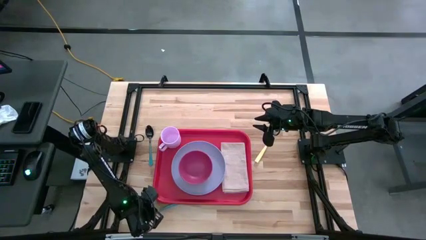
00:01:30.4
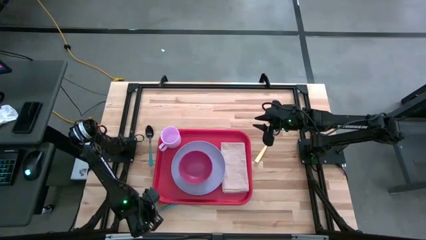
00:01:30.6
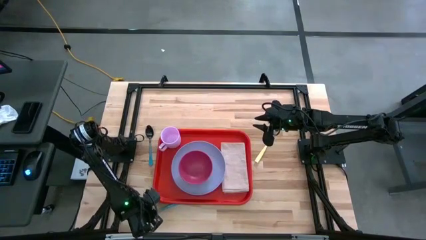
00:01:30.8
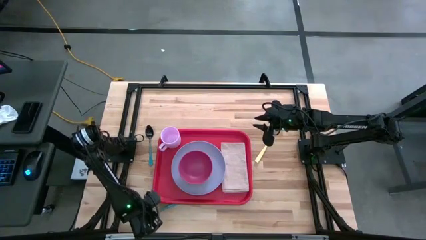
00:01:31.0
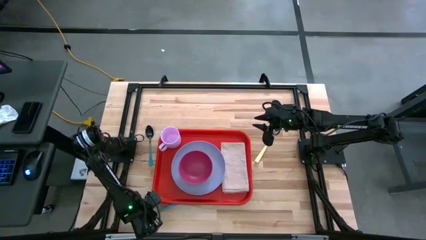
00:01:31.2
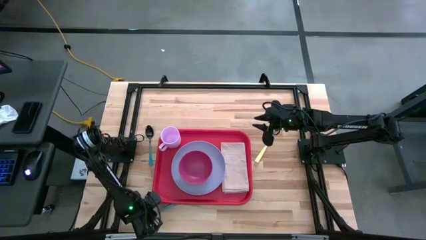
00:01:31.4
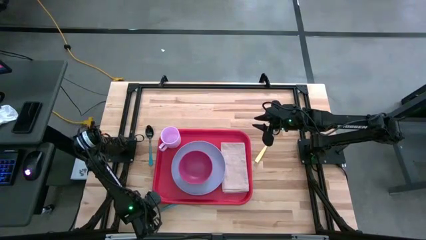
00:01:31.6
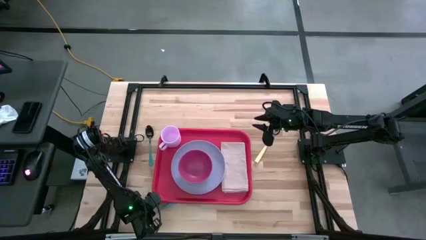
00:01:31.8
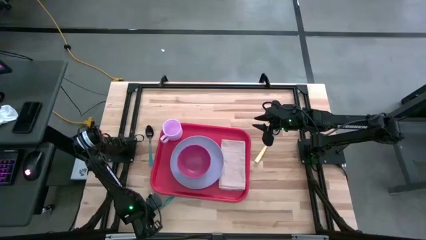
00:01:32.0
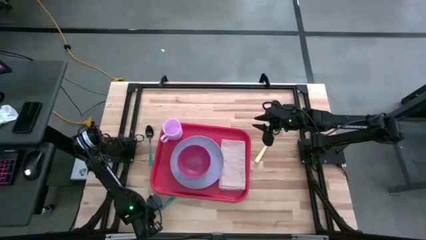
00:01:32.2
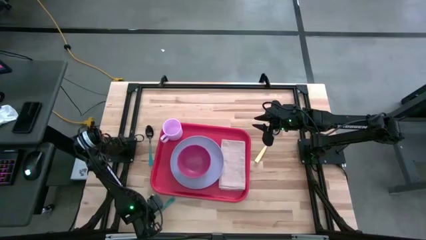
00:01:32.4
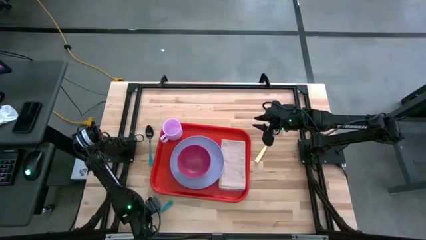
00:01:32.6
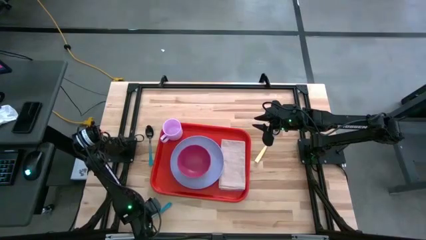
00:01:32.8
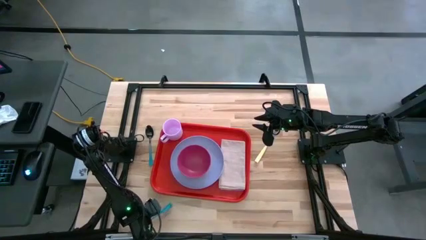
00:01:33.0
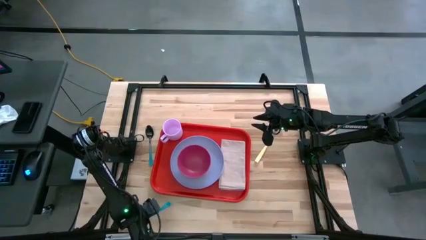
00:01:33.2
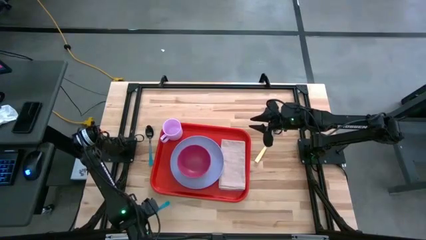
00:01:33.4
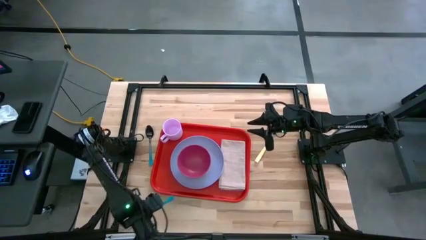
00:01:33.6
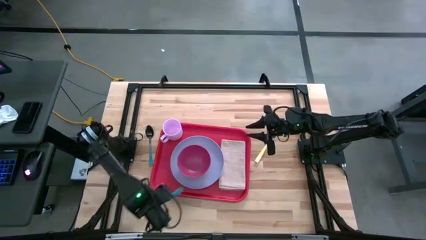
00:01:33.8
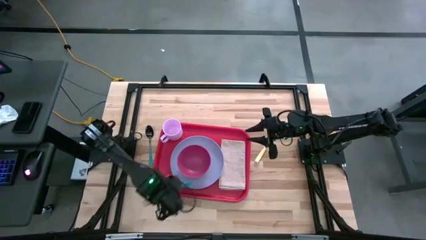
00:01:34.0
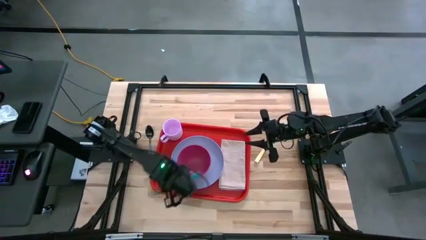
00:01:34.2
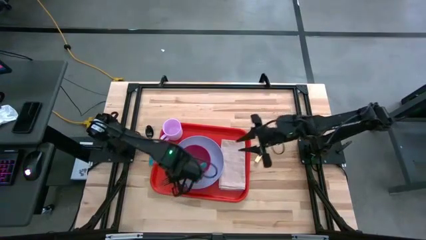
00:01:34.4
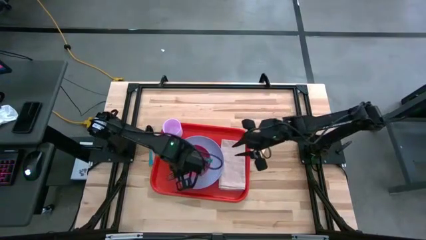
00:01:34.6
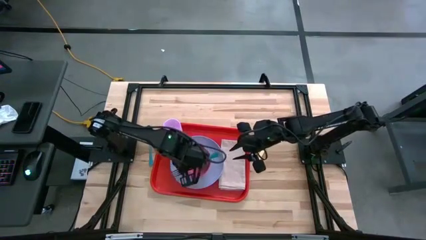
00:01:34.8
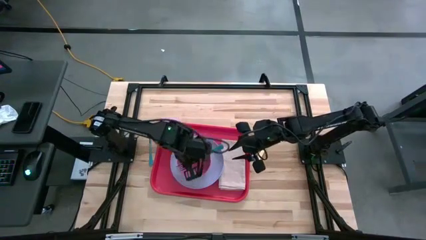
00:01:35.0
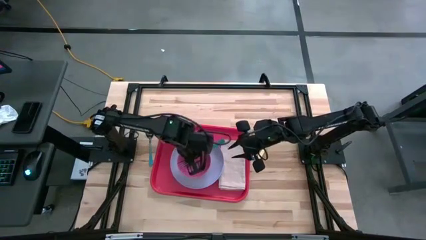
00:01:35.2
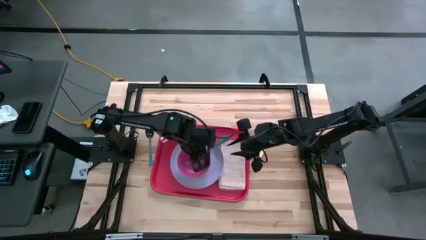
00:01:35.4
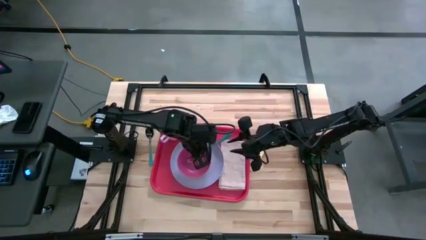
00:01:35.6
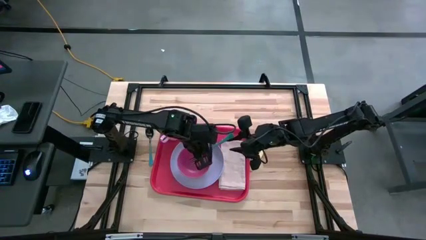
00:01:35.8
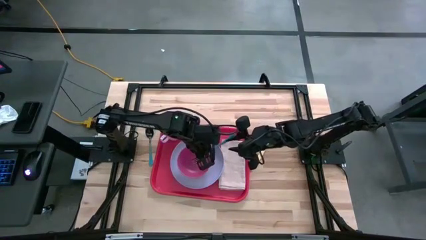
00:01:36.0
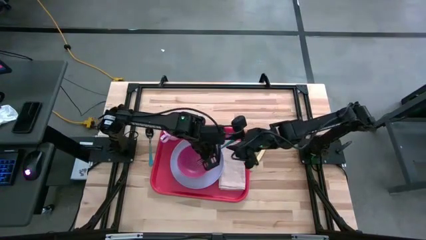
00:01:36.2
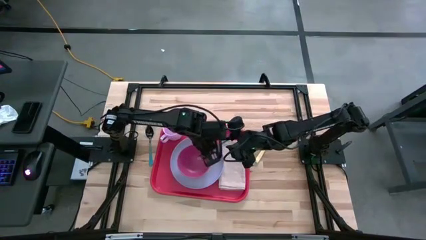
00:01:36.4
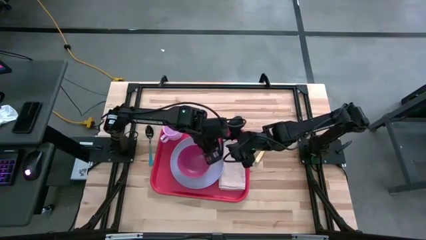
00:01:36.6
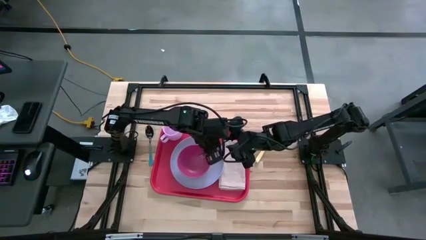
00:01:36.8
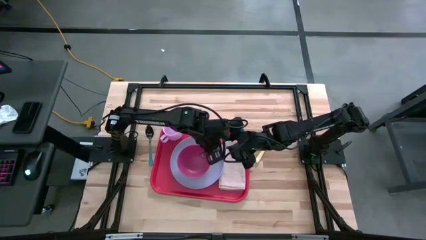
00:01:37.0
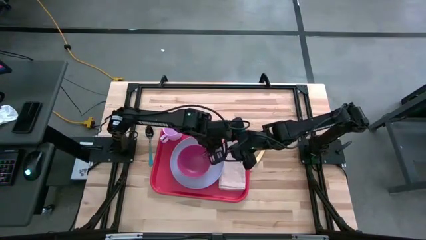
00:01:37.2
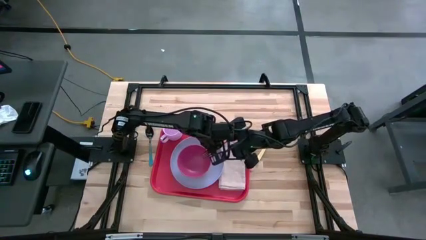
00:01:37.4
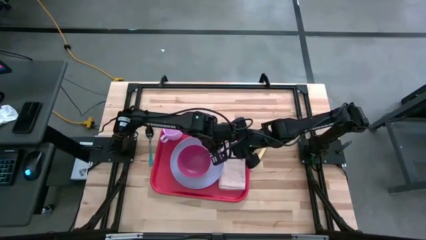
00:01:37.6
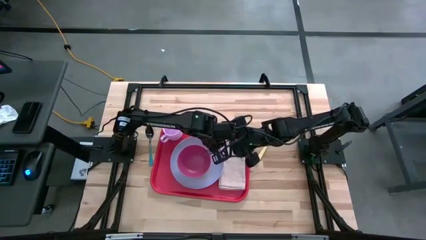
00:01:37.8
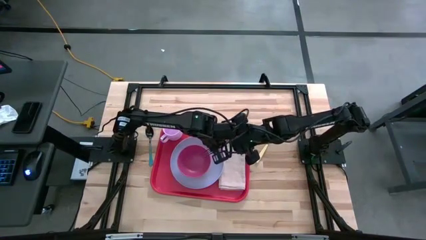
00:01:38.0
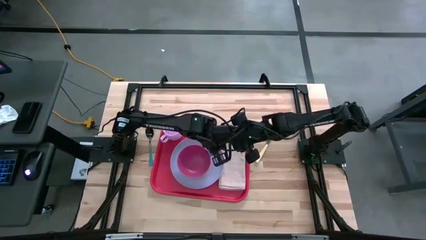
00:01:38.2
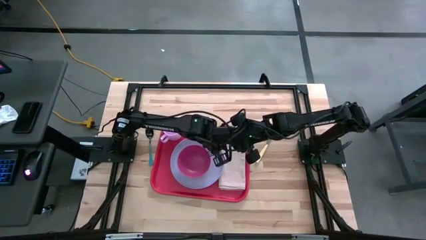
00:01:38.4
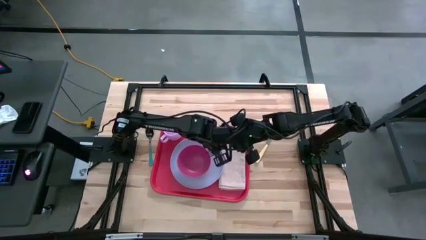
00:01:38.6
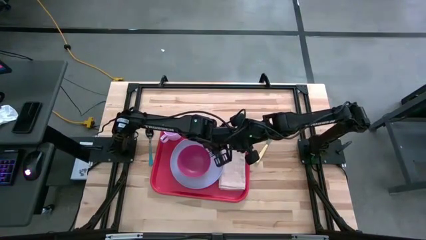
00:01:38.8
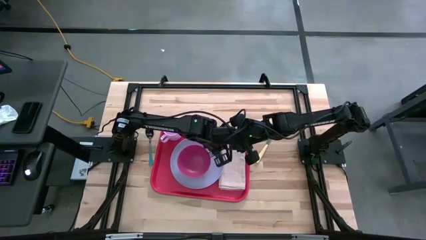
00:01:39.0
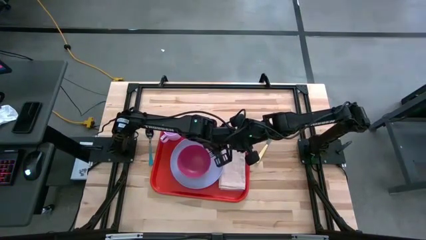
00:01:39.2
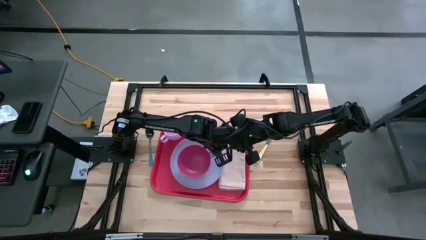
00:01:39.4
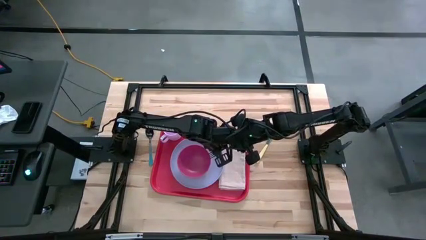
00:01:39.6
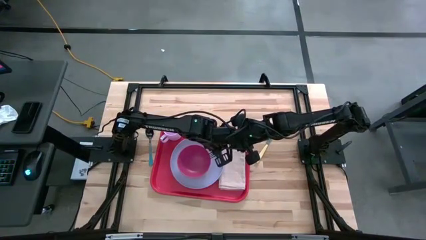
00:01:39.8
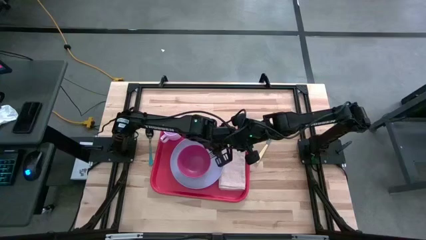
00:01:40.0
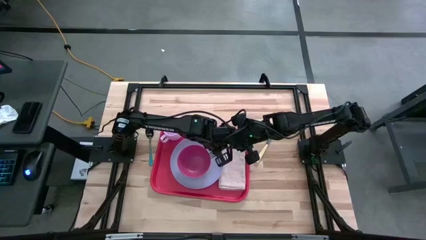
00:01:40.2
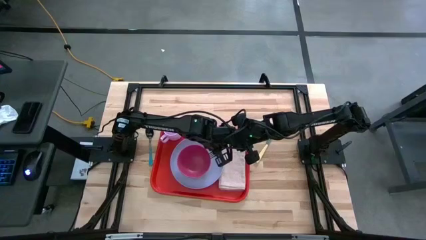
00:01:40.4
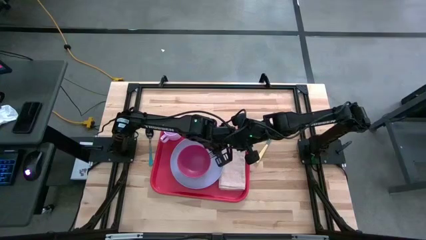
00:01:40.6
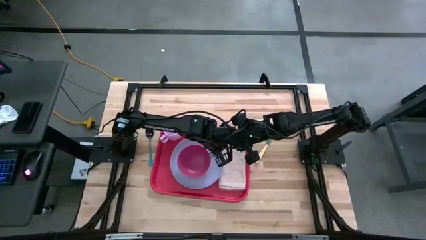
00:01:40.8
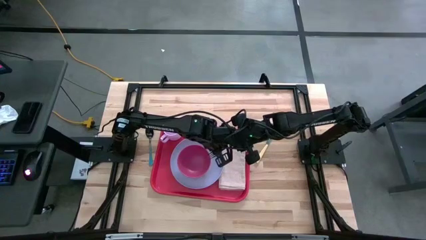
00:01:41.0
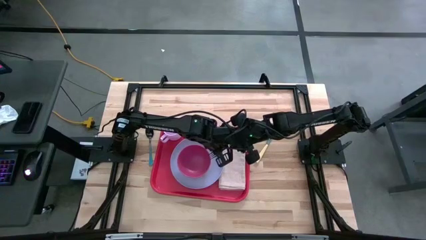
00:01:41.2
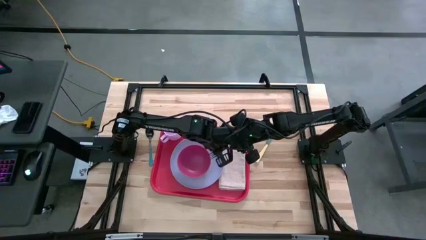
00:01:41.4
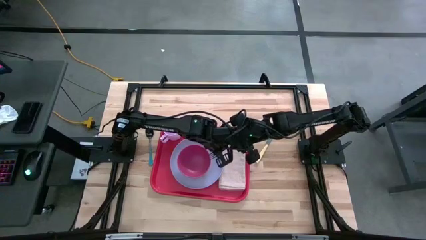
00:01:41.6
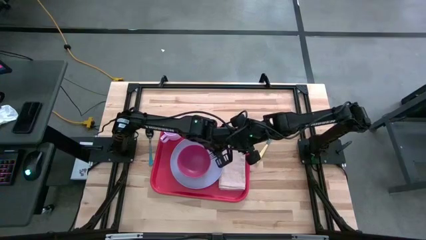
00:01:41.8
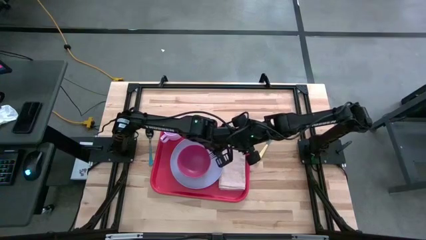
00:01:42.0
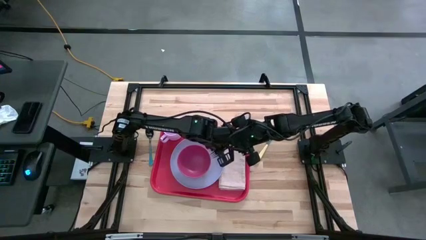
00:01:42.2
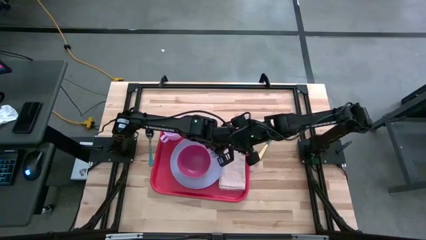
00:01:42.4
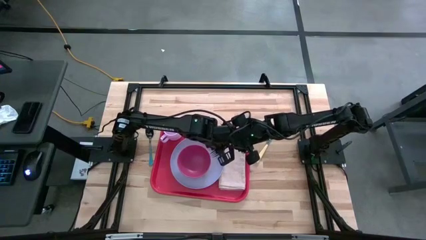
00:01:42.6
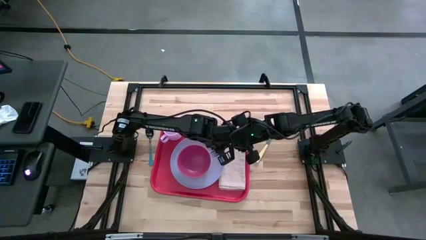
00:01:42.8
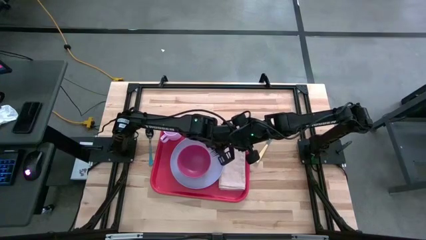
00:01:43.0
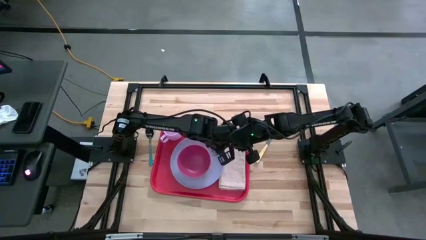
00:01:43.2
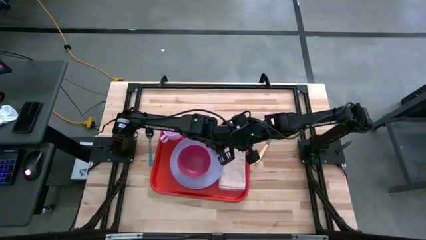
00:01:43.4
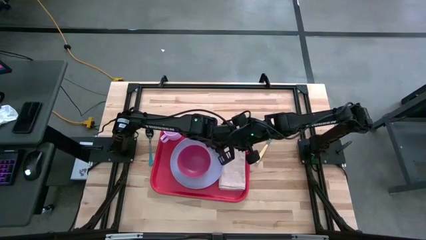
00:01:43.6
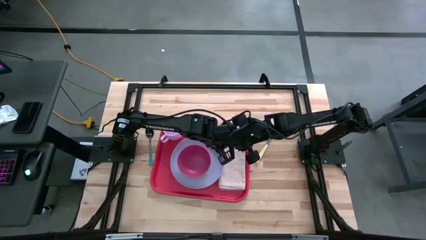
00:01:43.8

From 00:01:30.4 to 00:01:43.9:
Task: Set up tray
Put the blue fork on the gray napkin

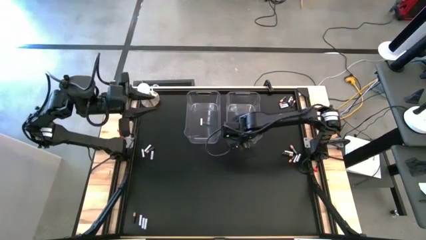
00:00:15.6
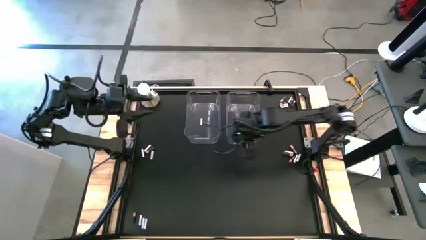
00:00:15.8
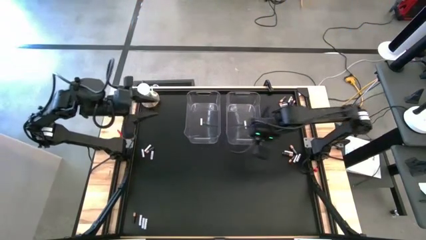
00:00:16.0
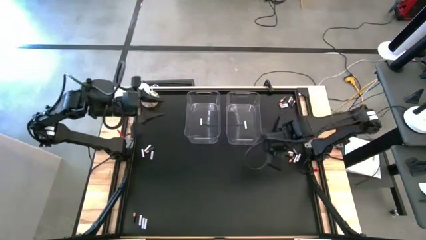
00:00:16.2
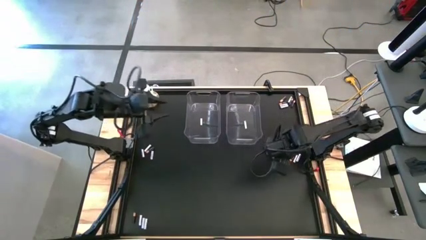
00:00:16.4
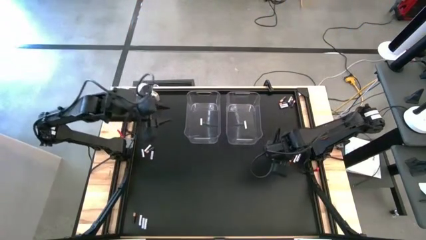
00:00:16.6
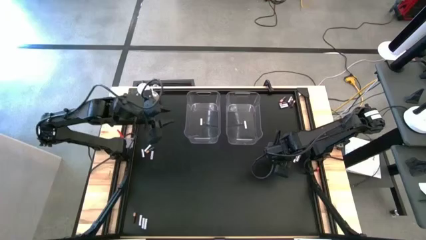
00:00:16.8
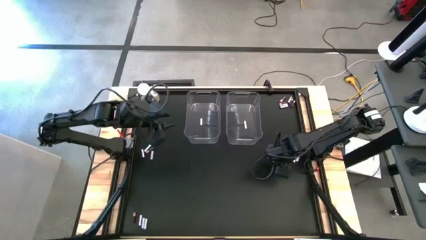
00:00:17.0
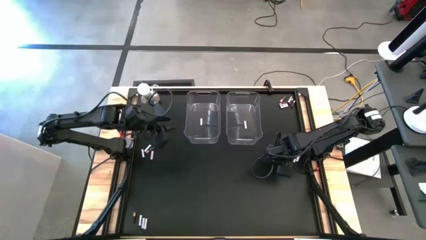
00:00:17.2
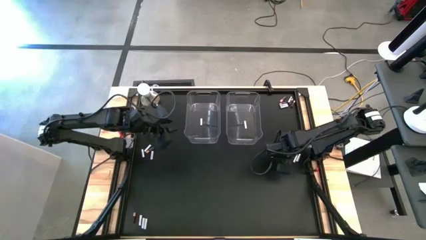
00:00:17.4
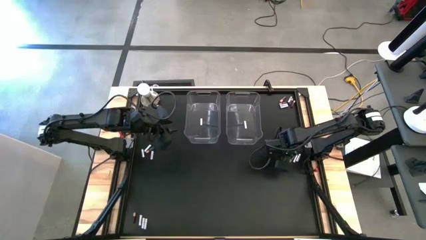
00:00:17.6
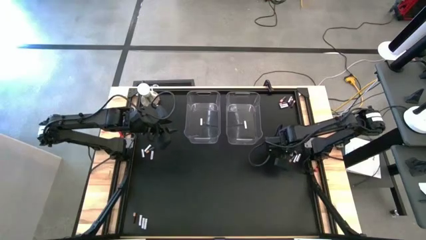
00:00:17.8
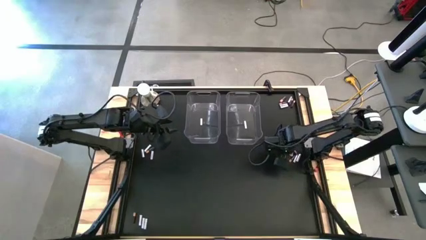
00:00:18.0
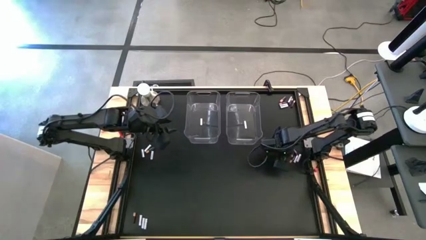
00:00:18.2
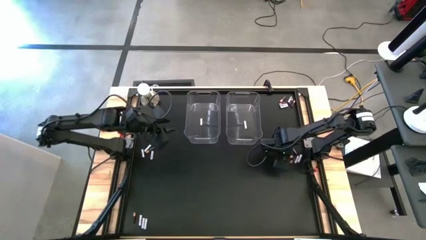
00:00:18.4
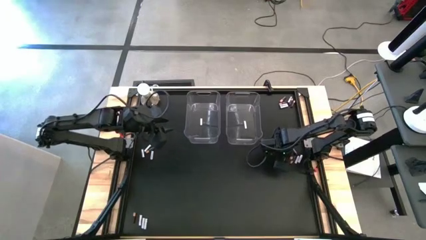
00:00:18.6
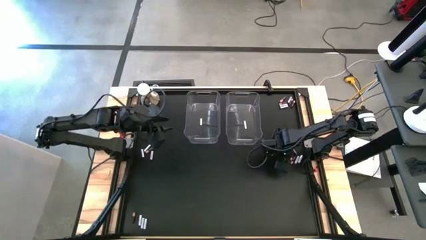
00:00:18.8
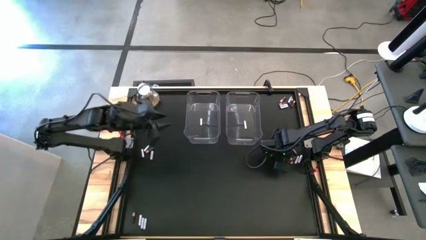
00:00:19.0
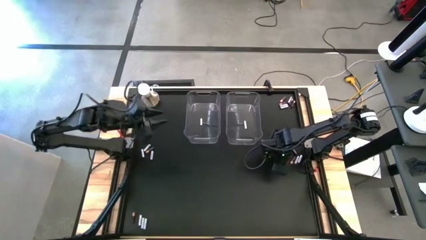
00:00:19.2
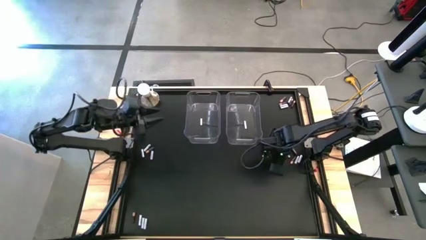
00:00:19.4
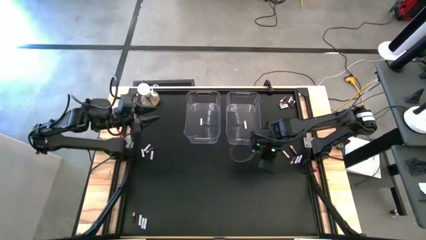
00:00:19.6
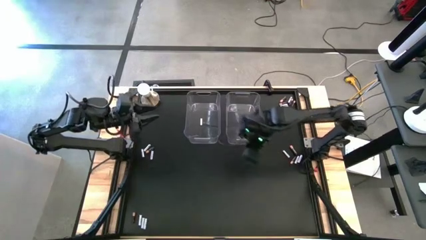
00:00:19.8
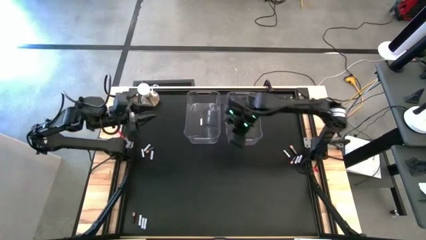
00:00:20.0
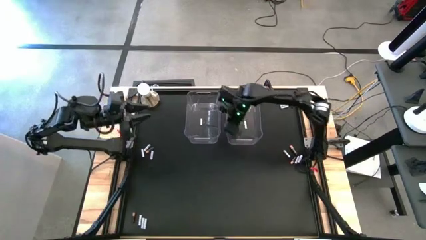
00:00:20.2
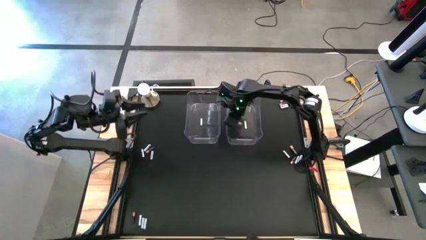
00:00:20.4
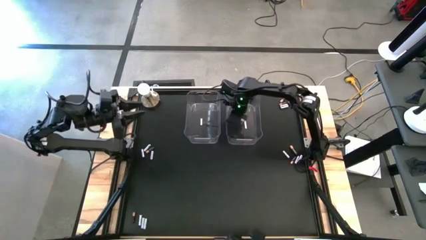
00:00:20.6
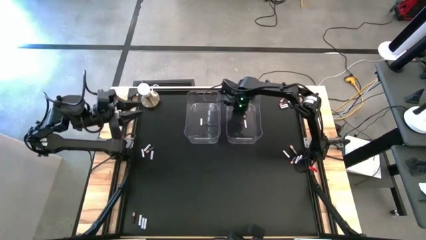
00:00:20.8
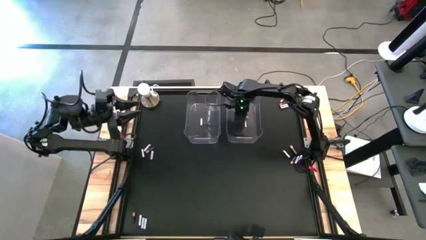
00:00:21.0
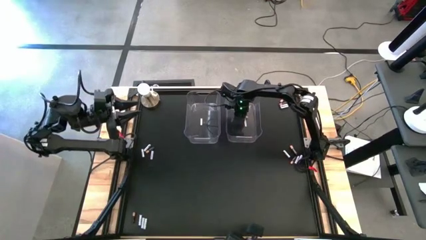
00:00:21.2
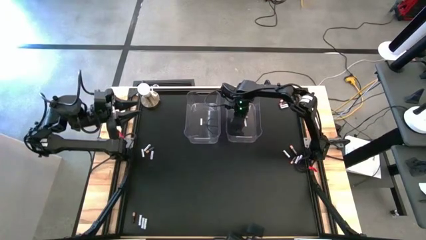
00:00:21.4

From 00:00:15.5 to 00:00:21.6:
Task: Sort batteries
Put the brown battery into the right transparent bin
